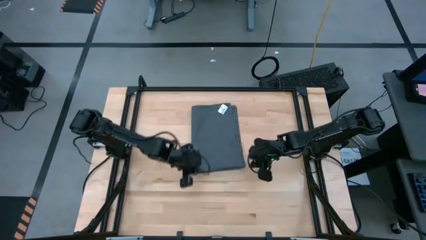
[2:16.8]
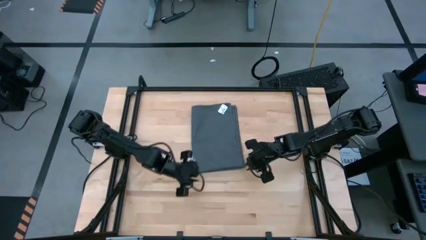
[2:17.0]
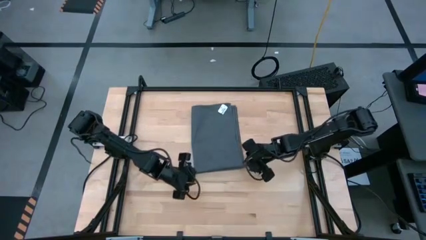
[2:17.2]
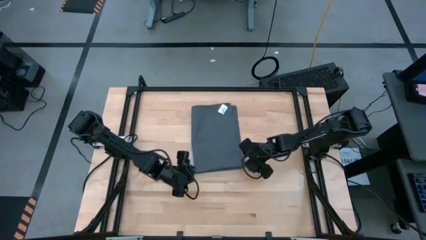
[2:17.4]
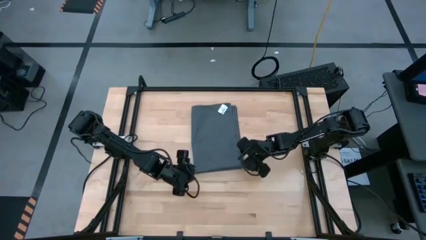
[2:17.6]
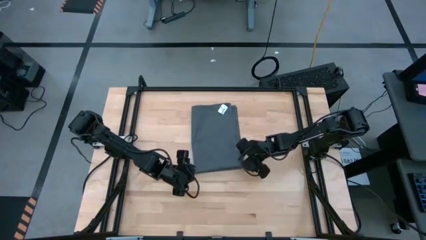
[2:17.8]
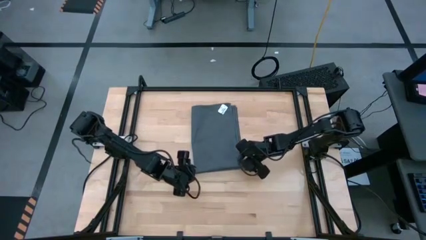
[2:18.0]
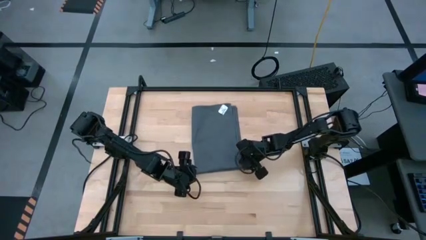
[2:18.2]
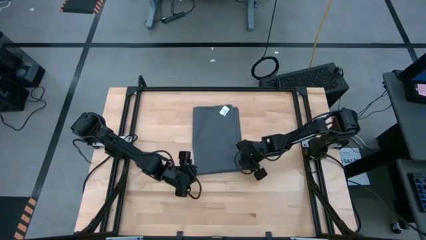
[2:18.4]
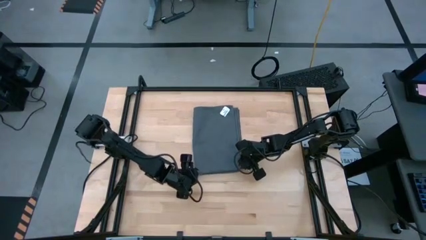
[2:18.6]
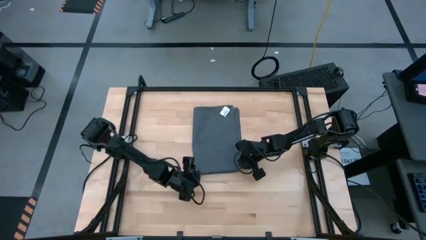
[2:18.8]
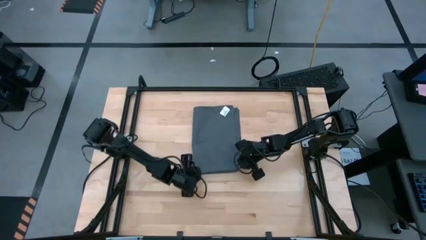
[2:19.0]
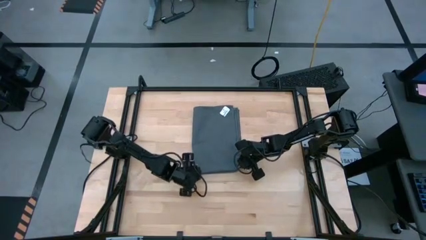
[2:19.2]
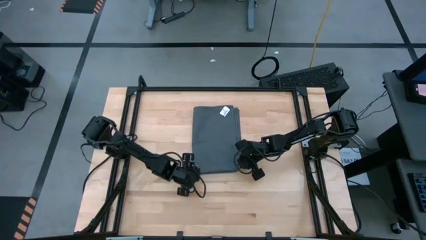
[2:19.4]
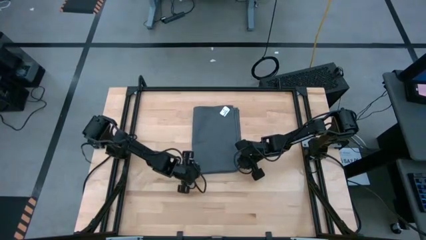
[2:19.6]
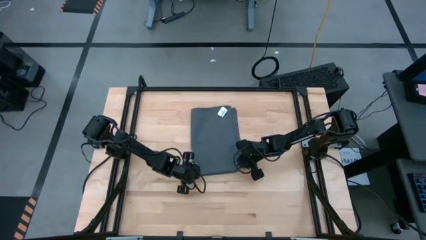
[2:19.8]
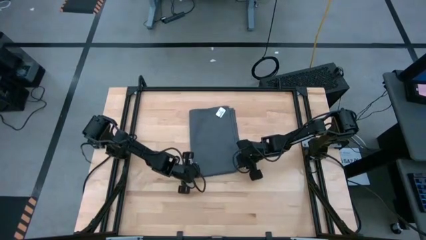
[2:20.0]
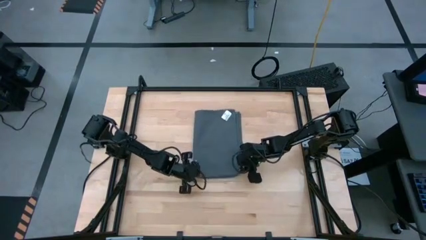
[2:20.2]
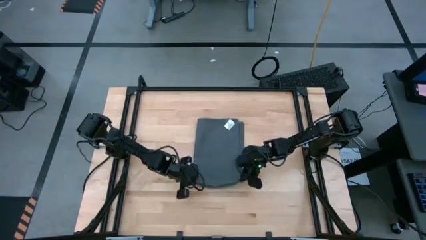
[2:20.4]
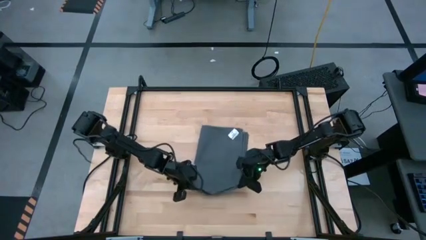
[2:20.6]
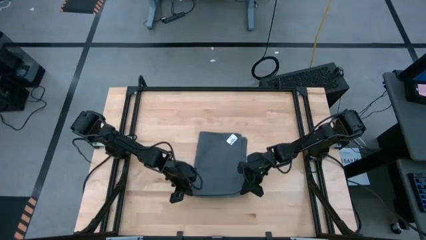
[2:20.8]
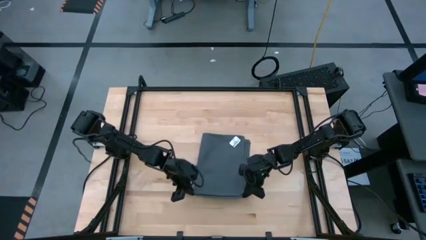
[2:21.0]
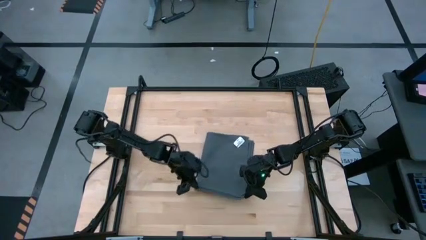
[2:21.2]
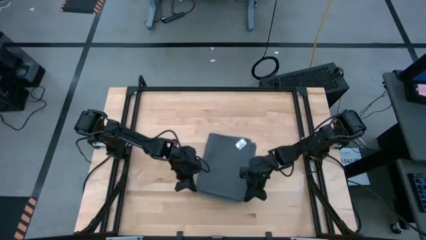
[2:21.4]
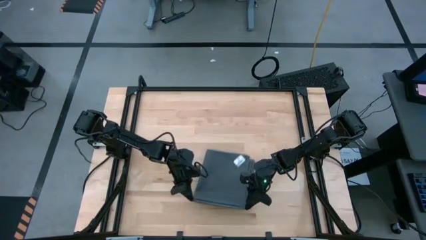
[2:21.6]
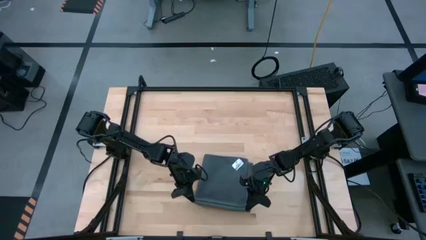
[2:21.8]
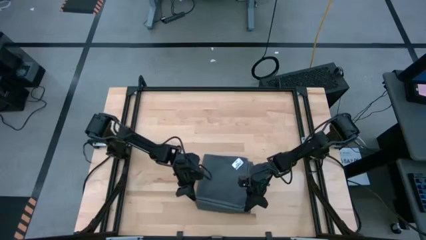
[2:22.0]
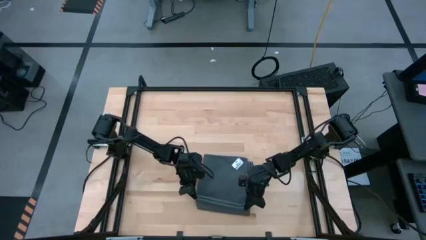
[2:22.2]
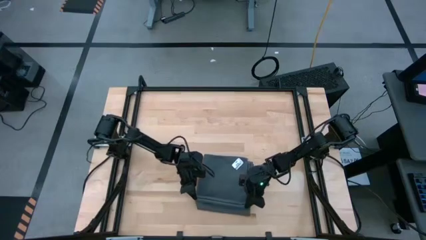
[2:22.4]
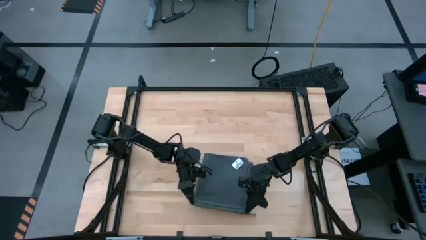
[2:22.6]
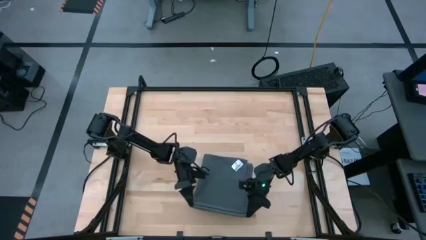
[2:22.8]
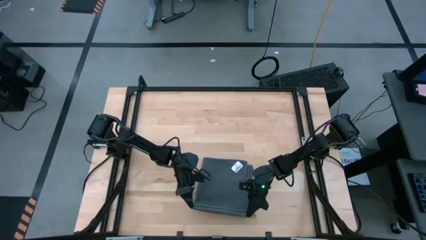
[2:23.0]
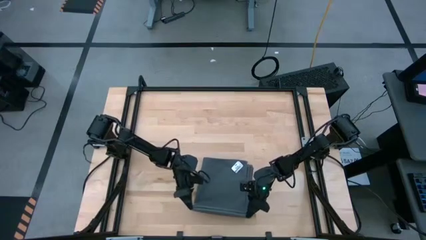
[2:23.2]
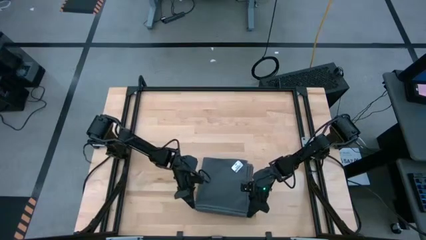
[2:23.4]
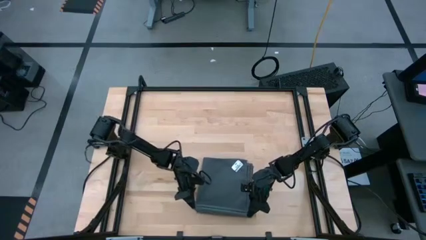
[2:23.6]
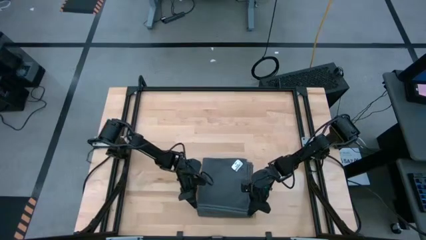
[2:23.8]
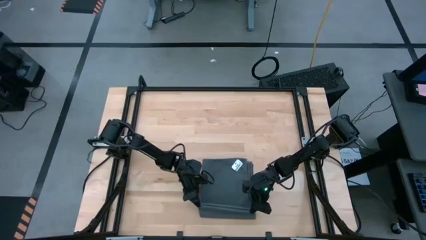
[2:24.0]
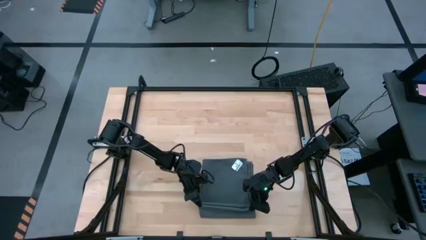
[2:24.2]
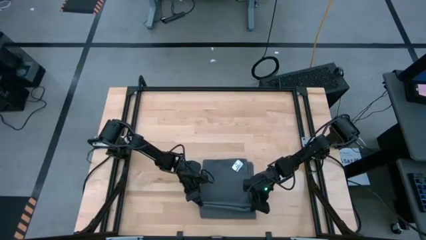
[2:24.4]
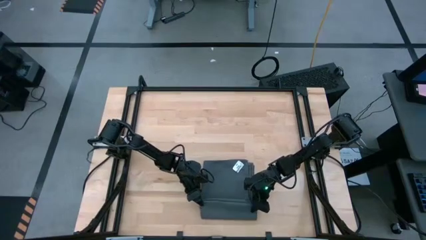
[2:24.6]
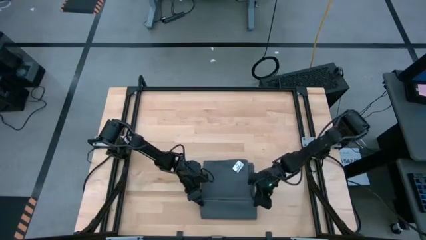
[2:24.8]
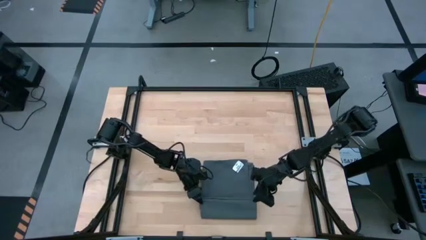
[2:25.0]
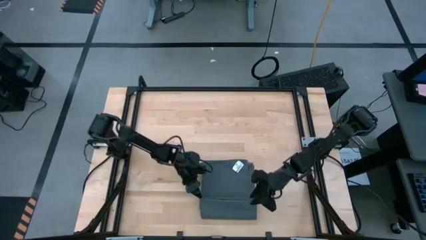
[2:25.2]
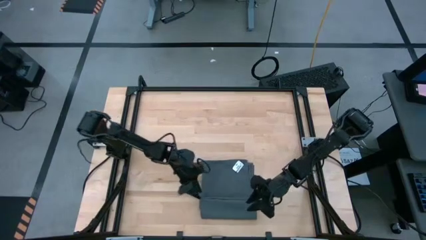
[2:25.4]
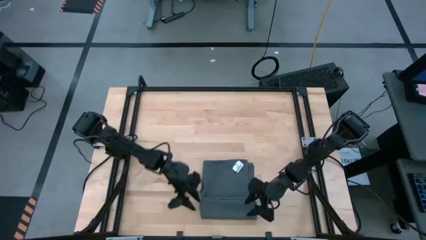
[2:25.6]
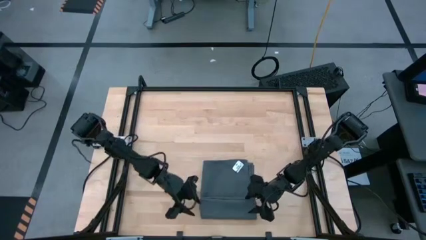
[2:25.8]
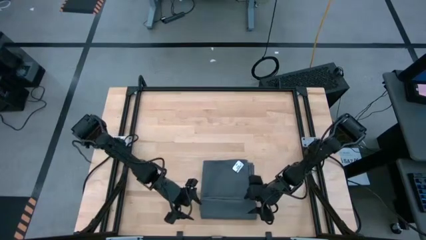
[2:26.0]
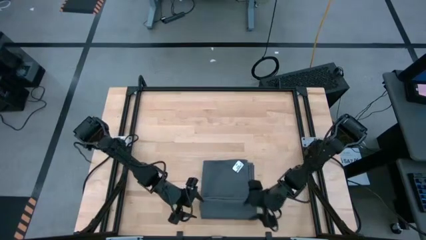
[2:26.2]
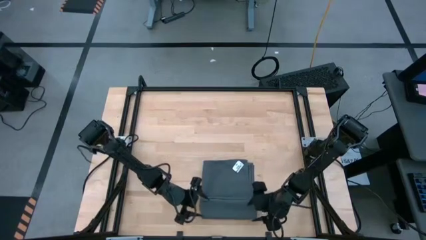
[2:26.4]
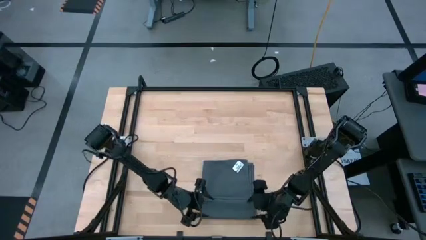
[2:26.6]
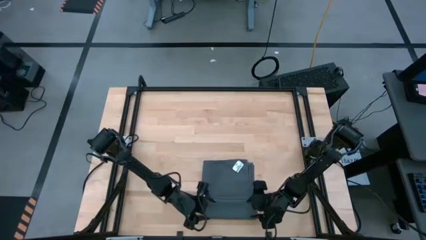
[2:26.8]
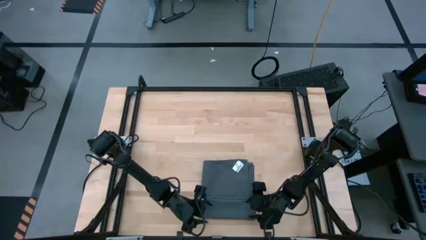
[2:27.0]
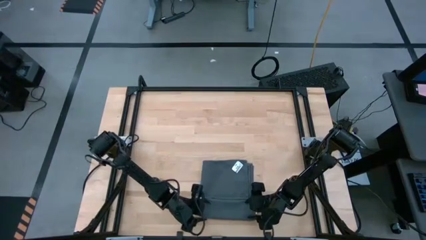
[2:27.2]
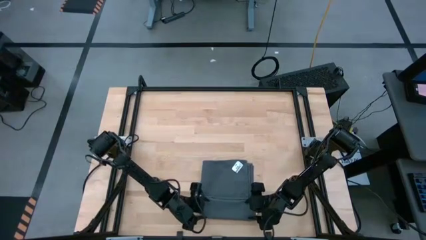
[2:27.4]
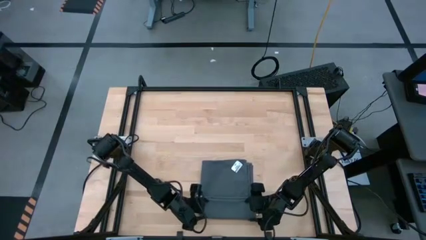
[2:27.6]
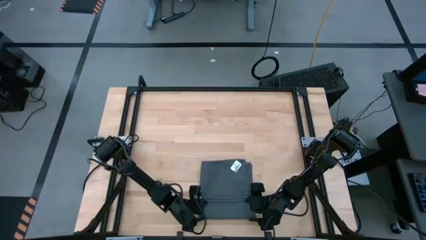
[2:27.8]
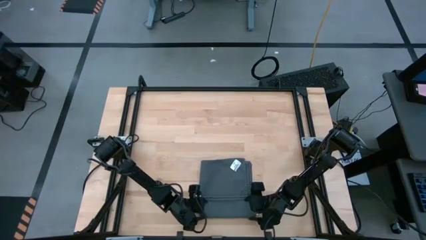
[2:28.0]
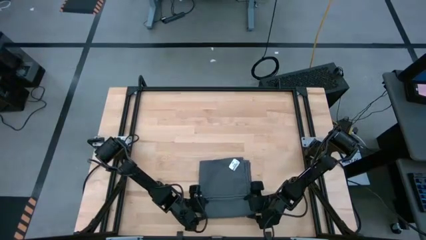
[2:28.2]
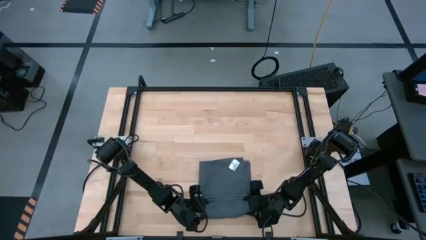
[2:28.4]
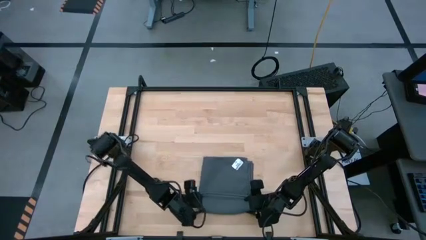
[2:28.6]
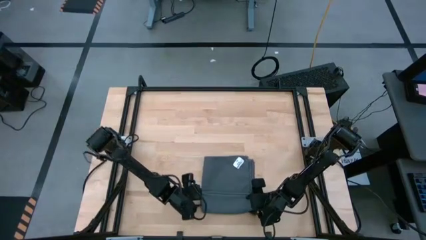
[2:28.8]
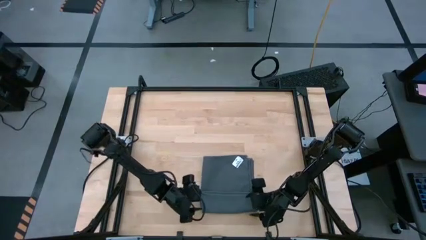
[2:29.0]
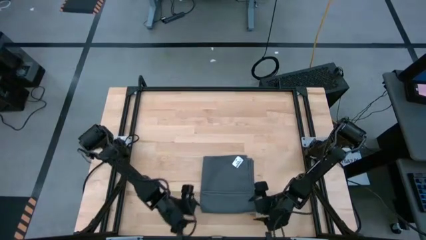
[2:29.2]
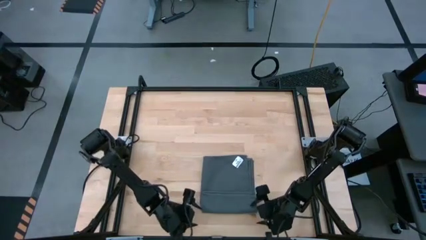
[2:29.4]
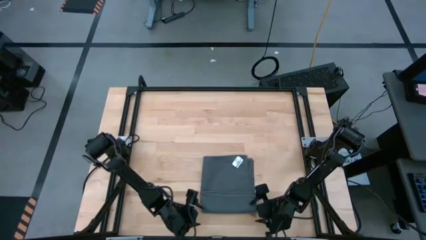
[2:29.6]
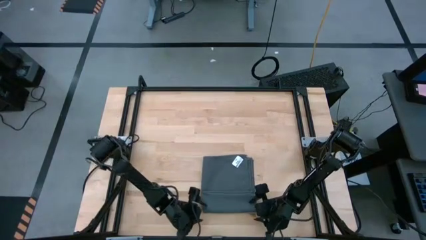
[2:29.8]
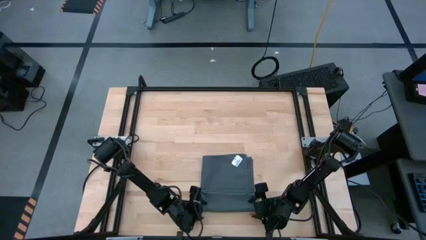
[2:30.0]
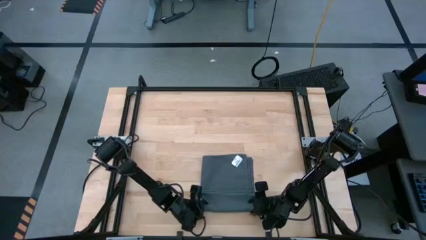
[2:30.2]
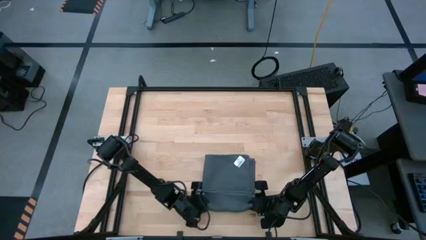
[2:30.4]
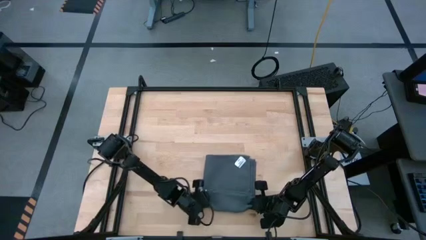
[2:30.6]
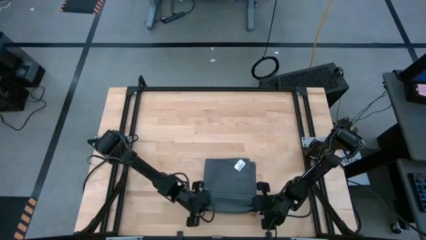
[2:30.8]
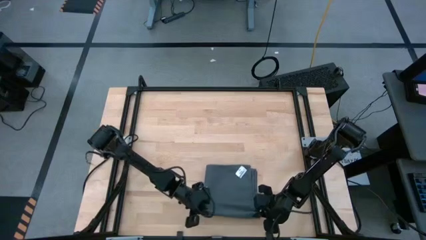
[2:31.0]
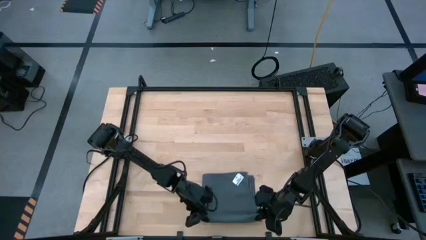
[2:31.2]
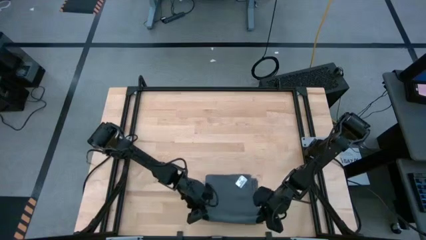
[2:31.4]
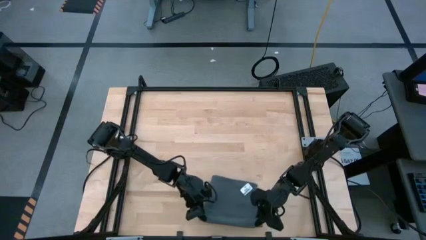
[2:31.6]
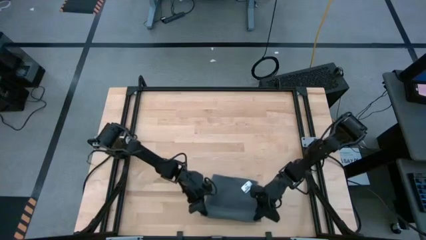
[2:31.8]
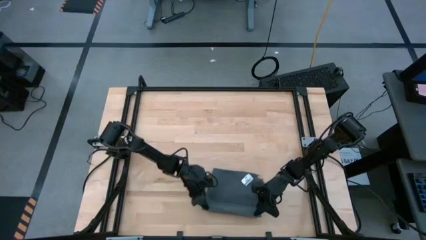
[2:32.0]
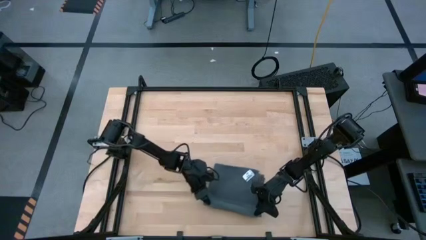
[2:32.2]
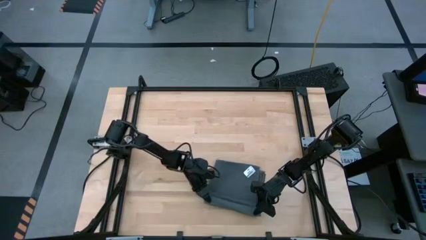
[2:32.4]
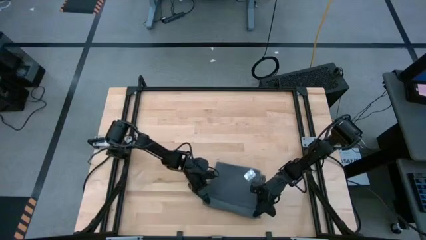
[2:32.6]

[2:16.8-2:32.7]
Task: Roll towel
Roll the gray towel on the center of table
